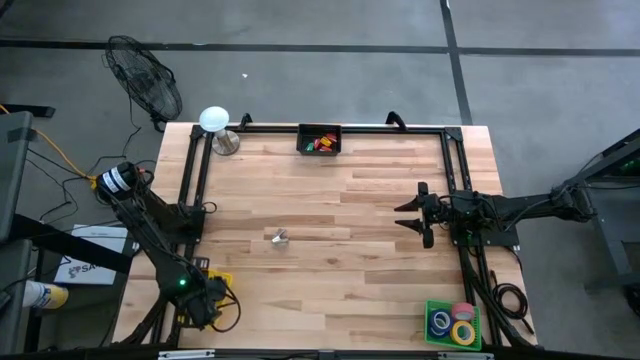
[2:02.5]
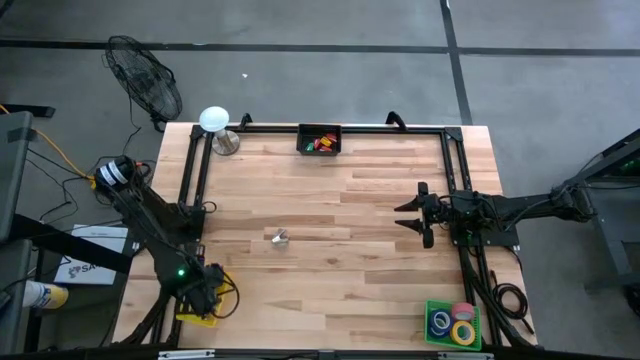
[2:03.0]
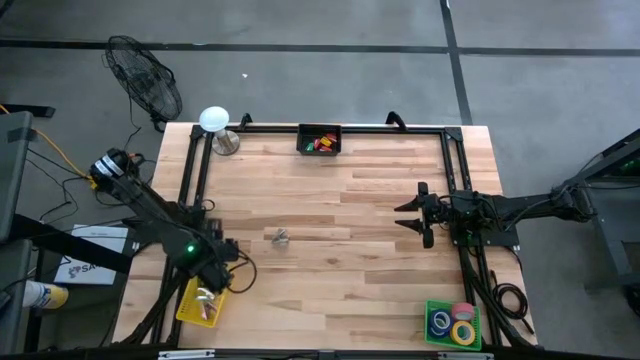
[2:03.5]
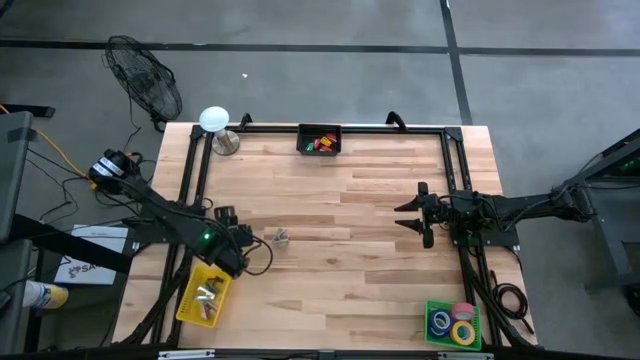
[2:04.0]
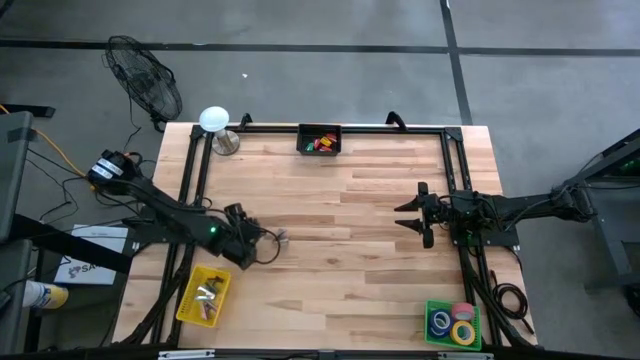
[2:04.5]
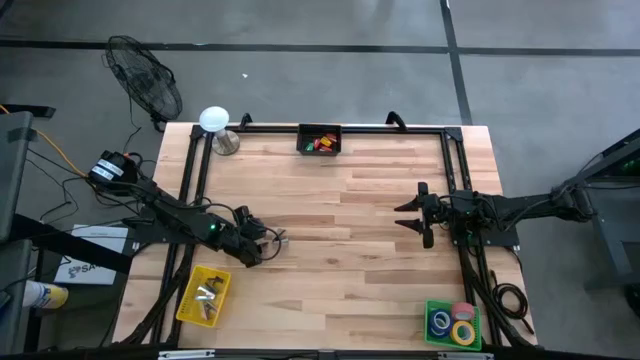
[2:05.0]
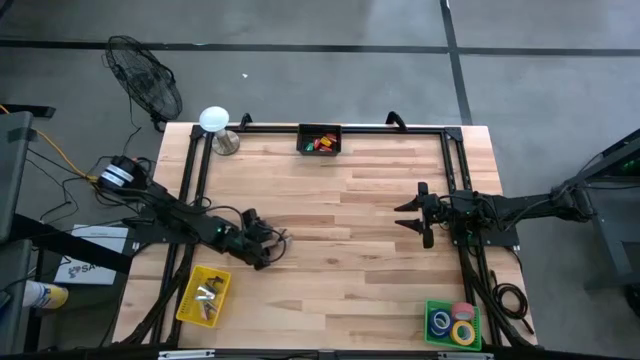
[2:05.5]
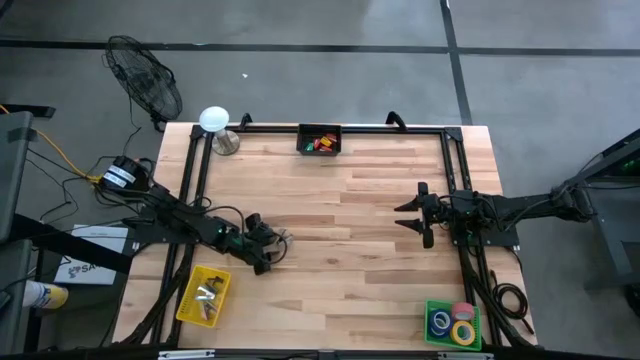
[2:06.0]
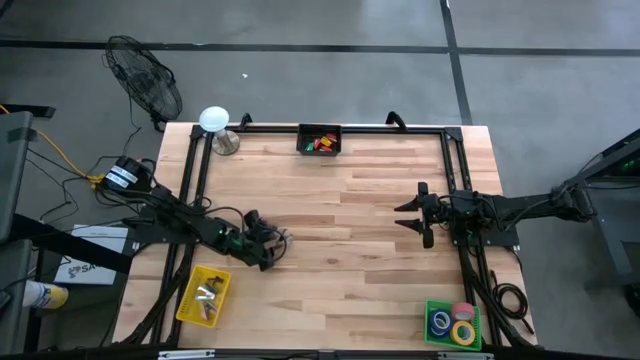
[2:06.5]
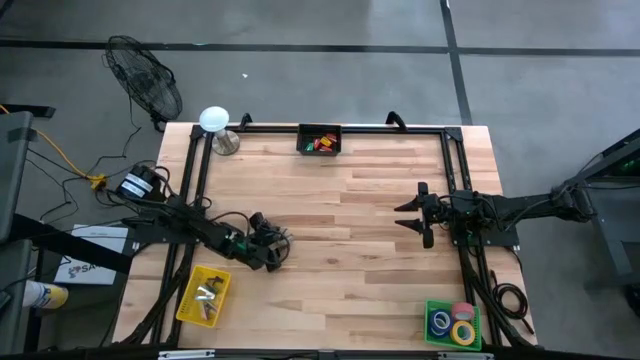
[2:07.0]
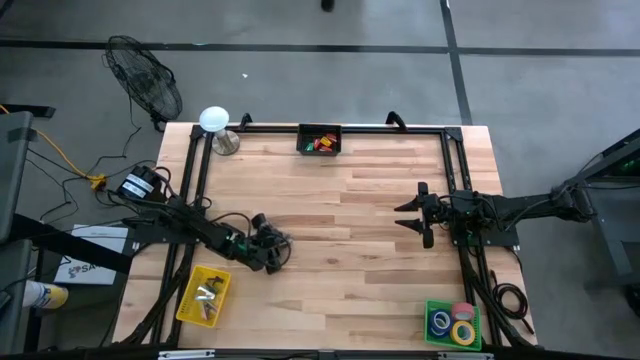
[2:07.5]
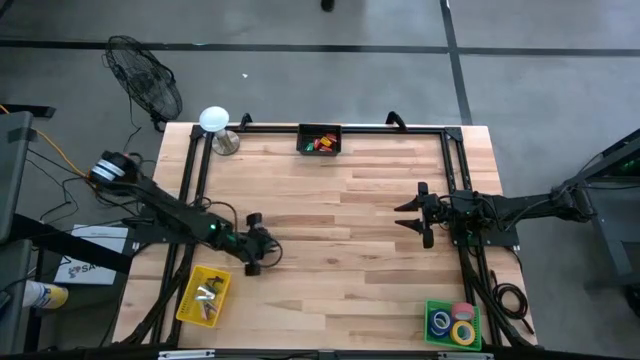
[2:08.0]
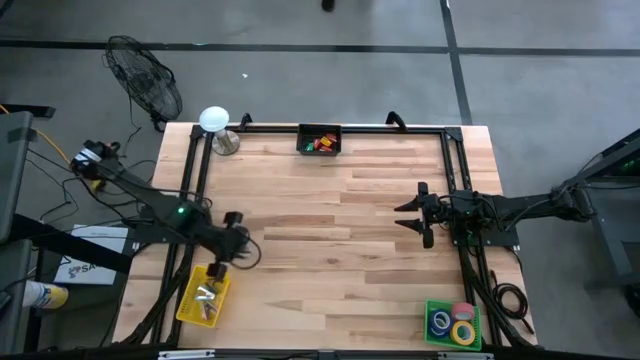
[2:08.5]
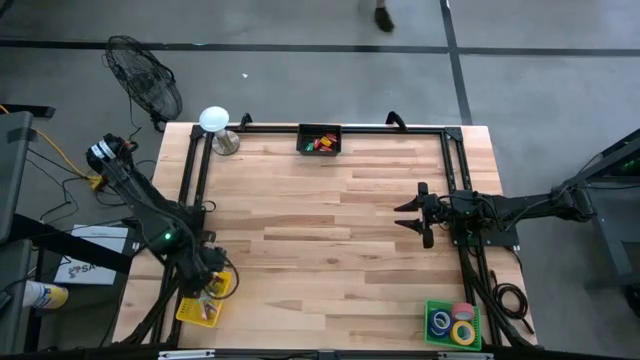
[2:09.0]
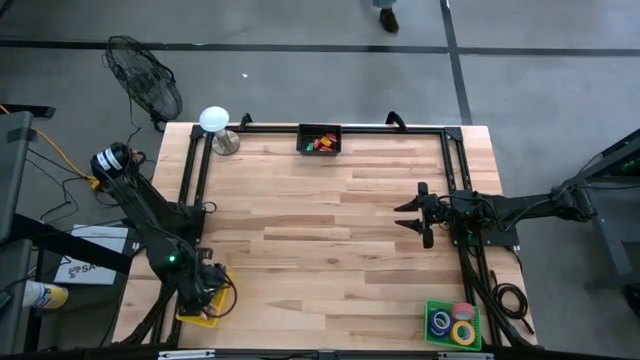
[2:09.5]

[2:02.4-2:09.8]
Task: Pick and place Stapler, Stapler remover, tape
Put the gray staple remover into the yellow bin

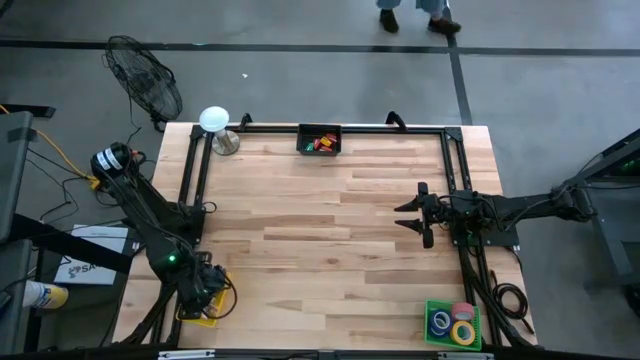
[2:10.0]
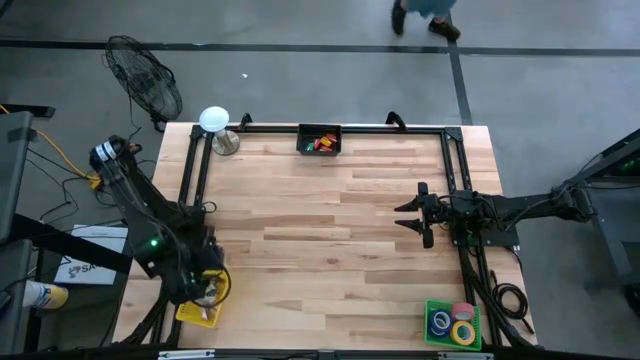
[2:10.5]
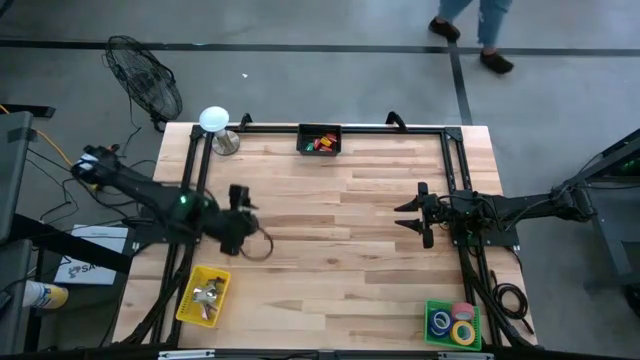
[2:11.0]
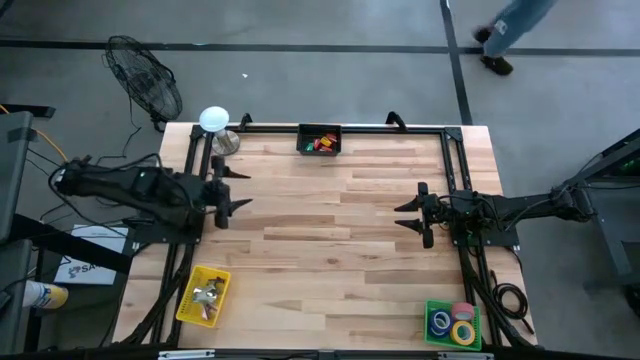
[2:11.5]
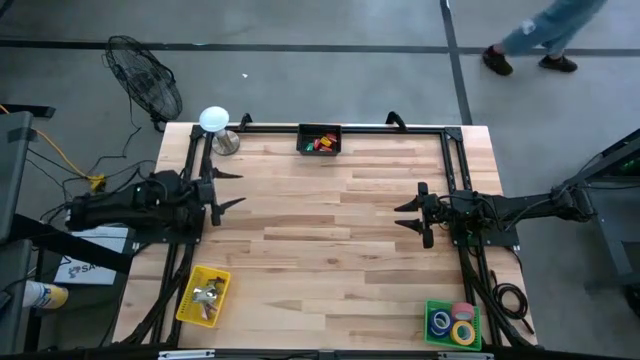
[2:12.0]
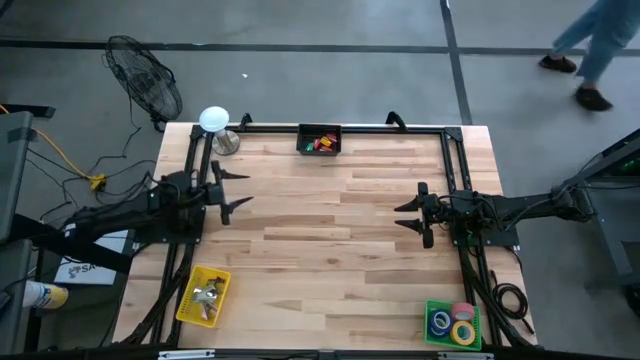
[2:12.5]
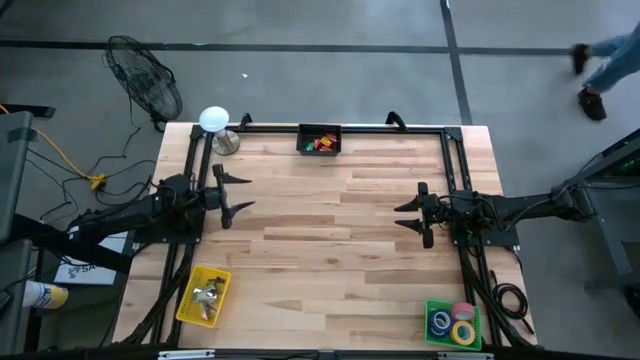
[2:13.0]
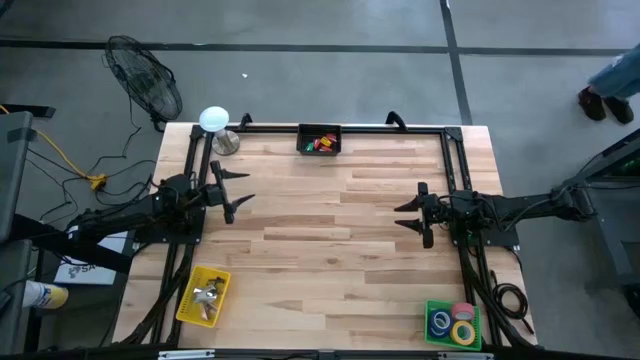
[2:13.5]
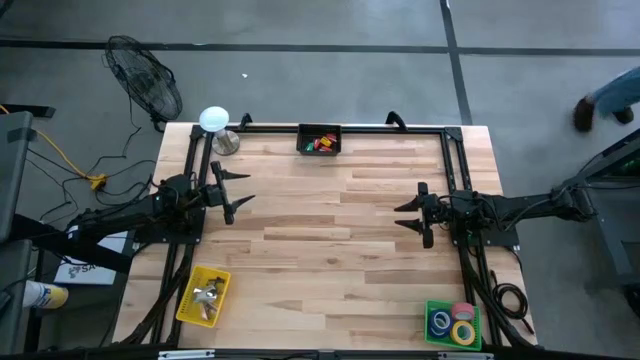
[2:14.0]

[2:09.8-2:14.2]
Return to Home Position

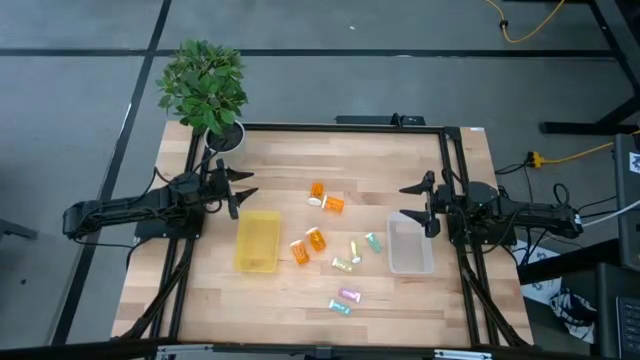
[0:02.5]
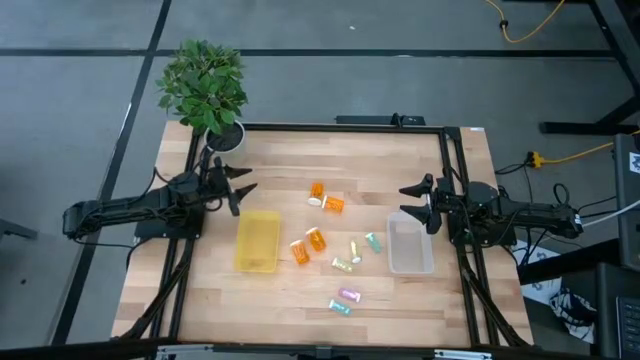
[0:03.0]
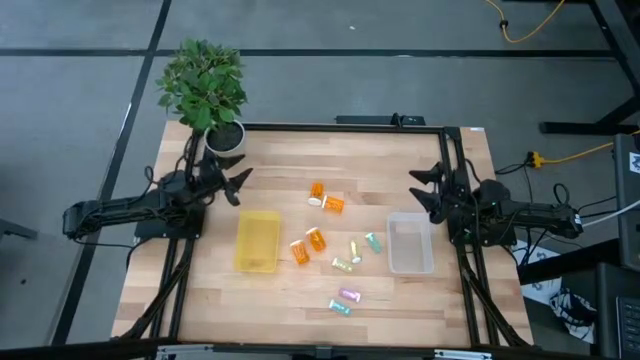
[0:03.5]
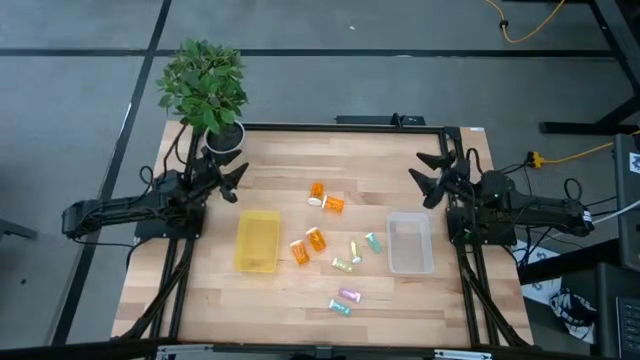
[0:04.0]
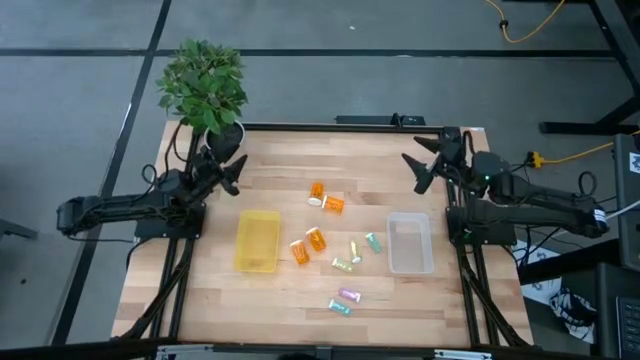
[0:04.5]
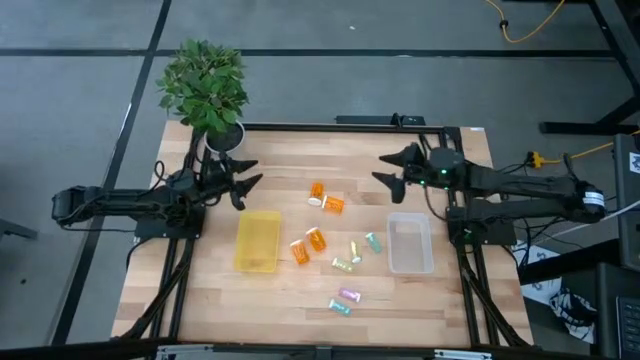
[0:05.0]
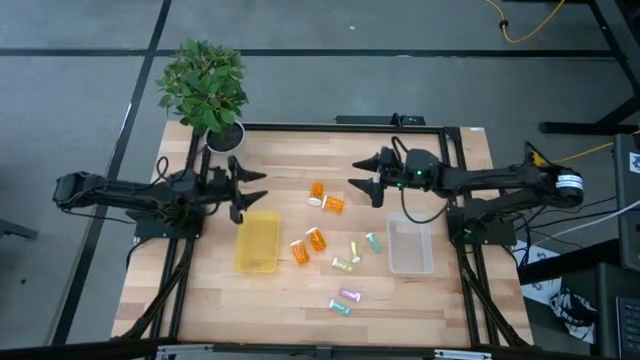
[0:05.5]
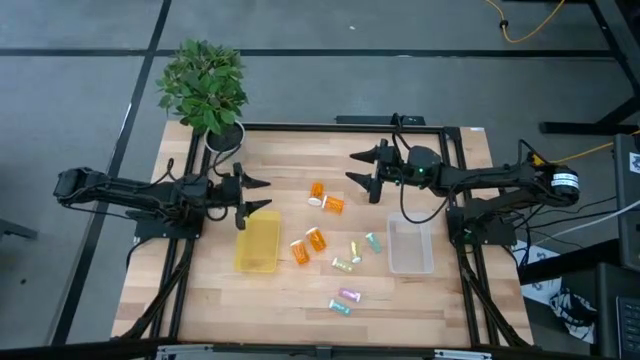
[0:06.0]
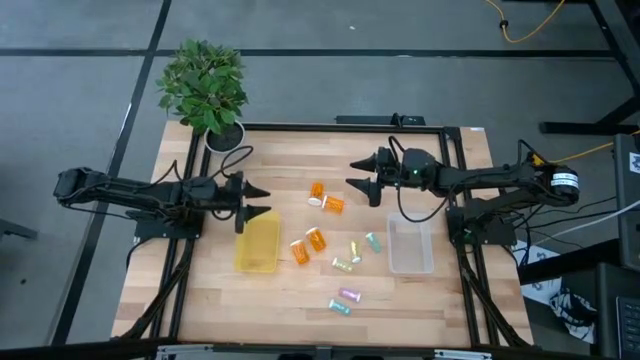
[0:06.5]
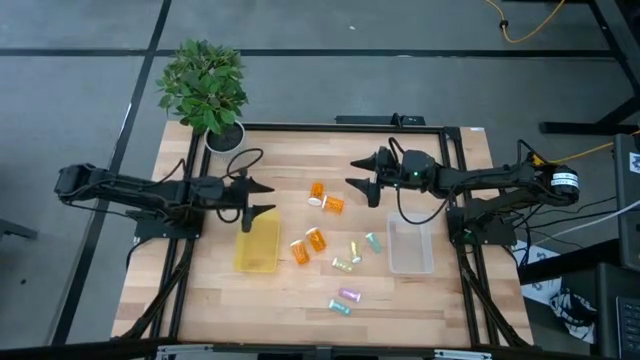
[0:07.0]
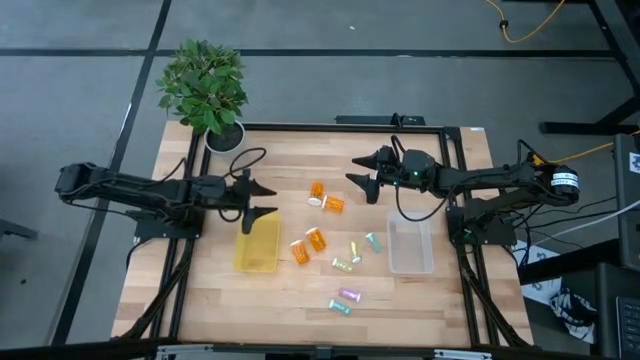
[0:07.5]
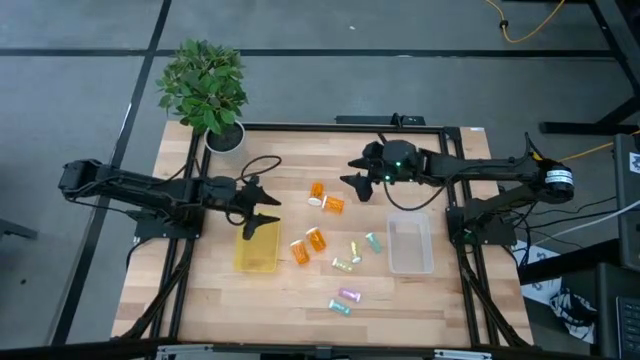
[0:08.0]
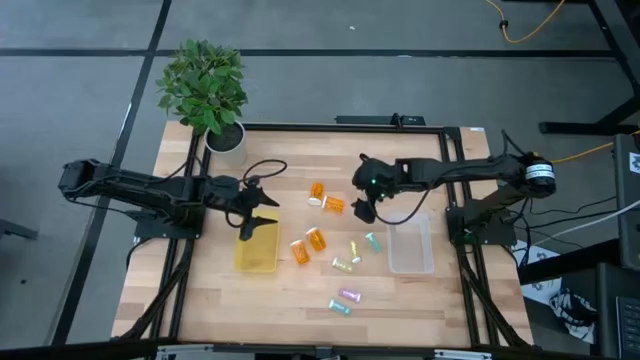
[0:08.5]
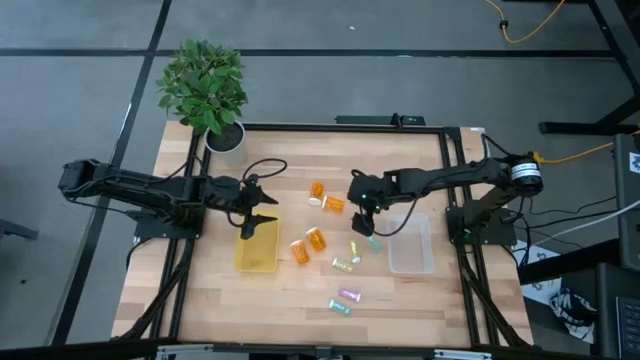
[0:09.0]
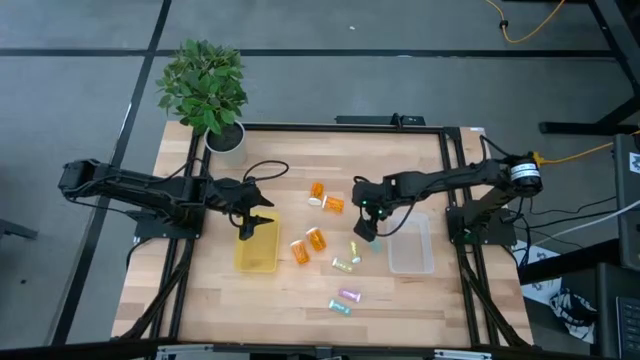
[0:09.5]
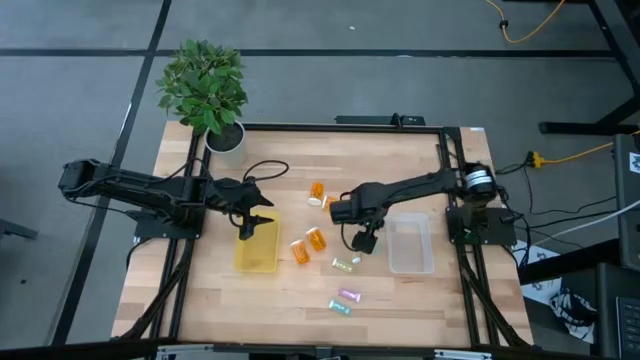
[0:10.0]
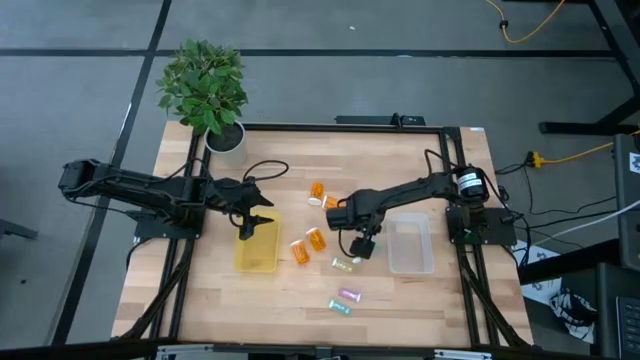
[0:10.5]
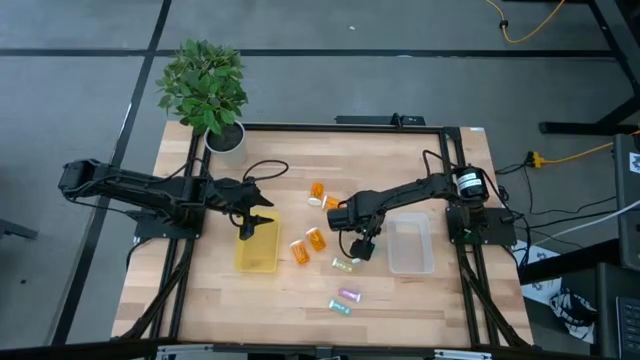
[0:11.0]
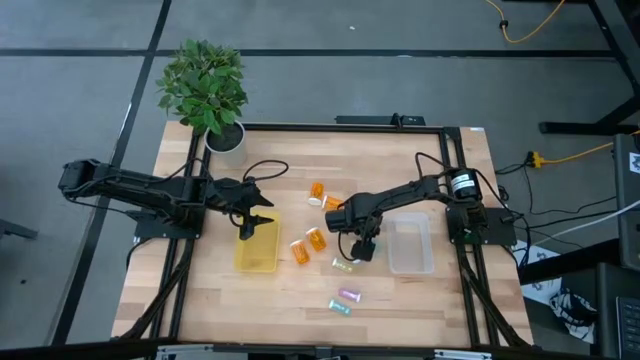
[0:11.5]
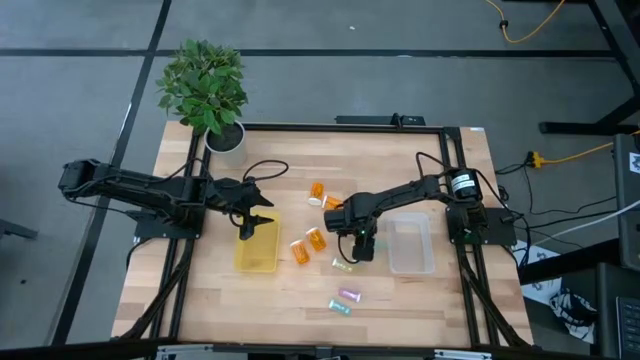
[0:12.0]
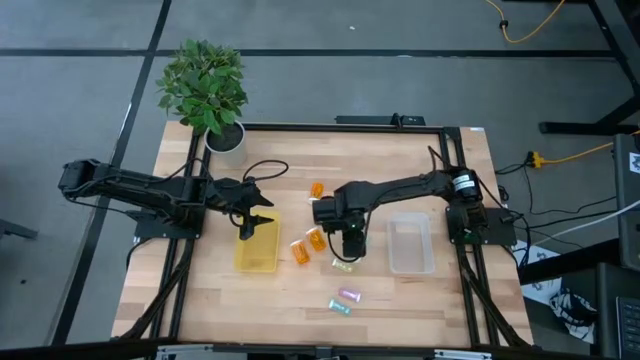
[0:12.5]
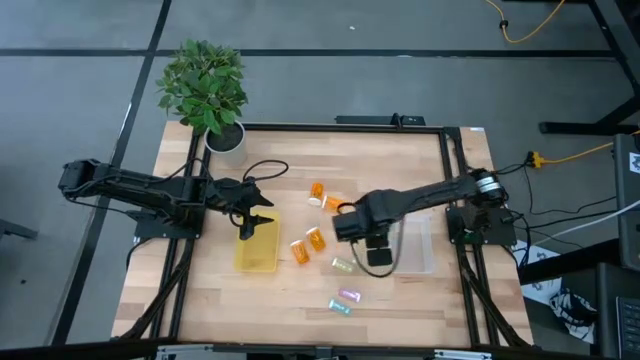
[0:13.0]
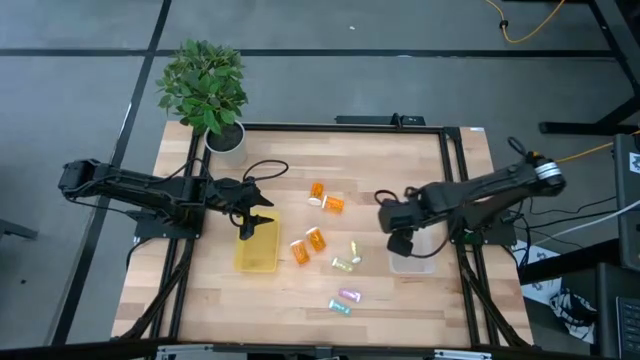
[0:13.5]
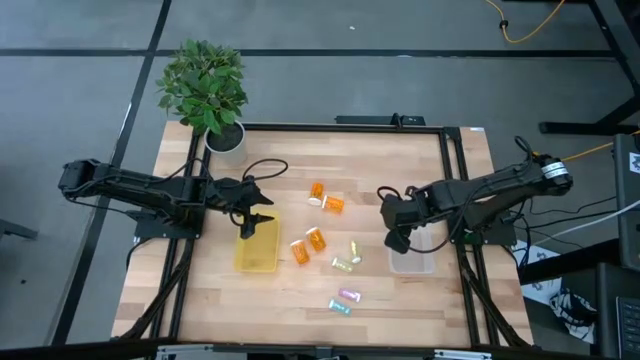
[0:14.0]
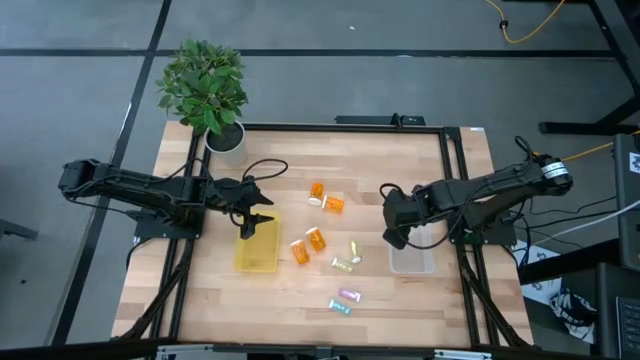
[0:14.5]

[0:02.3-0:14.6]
Task: Pick and place medicine bottles into bin by pill shape (circle, oval)
Put the blue pill bottle into the transparent bin
